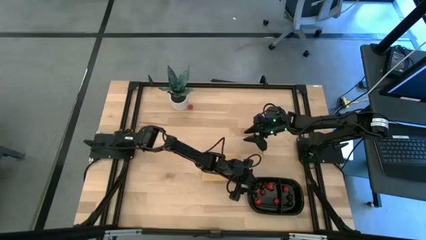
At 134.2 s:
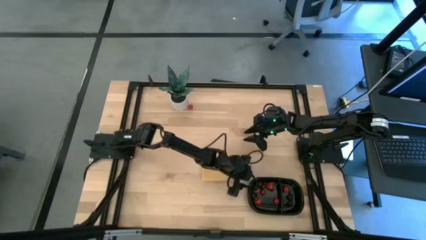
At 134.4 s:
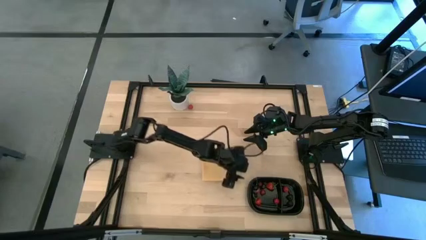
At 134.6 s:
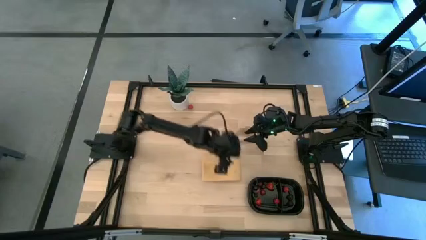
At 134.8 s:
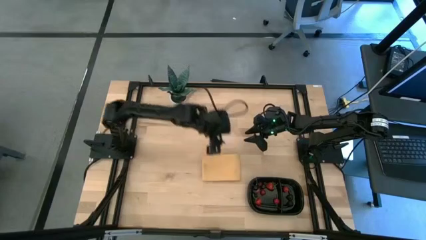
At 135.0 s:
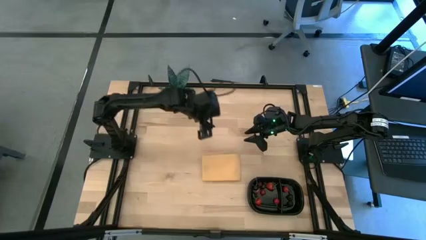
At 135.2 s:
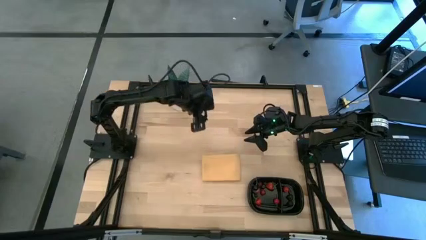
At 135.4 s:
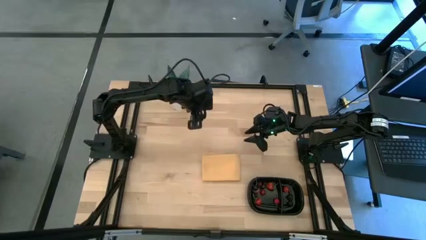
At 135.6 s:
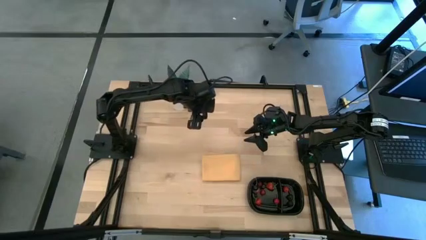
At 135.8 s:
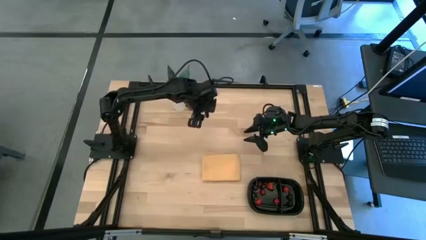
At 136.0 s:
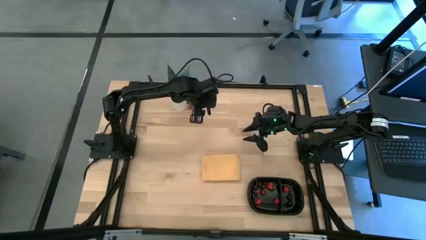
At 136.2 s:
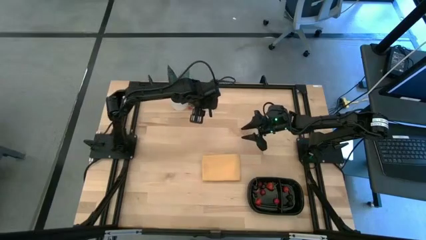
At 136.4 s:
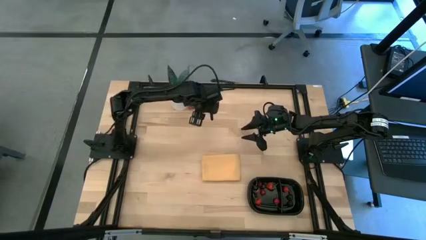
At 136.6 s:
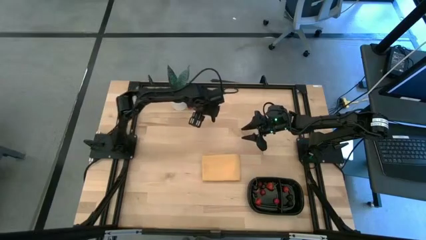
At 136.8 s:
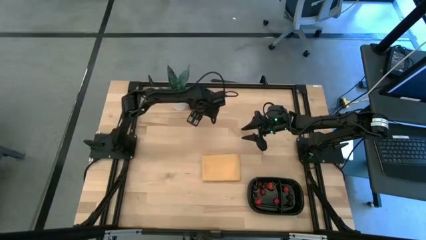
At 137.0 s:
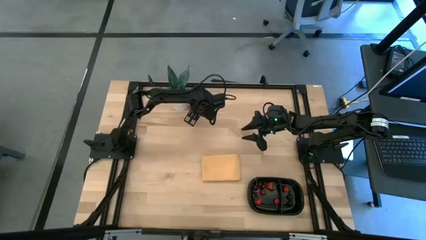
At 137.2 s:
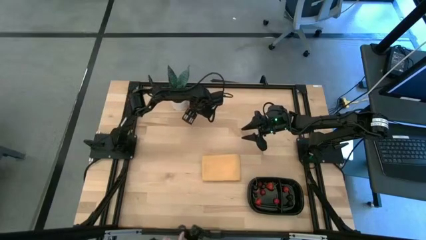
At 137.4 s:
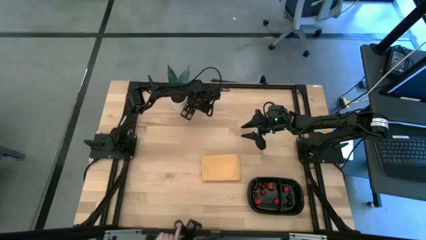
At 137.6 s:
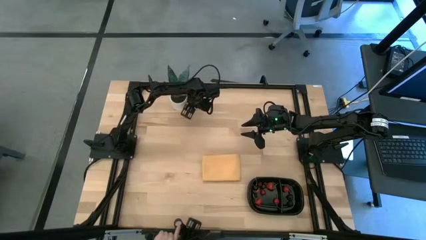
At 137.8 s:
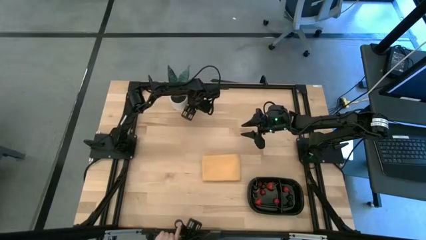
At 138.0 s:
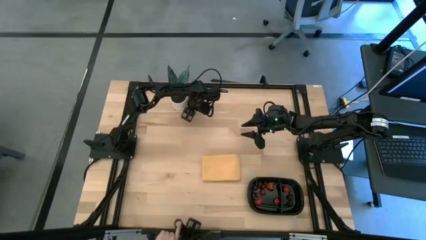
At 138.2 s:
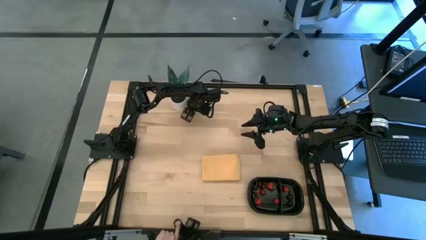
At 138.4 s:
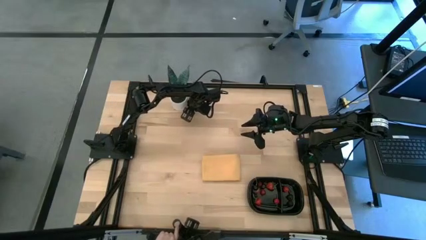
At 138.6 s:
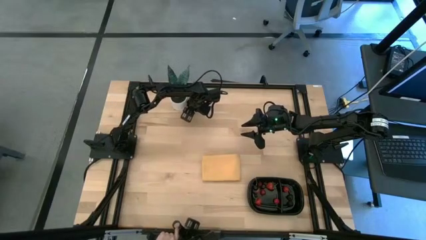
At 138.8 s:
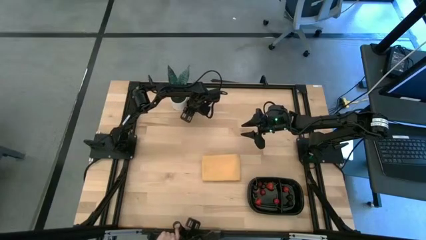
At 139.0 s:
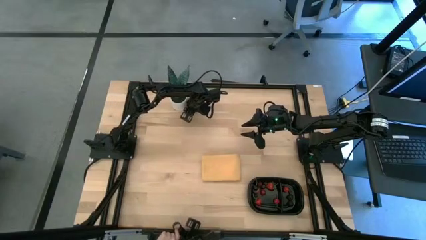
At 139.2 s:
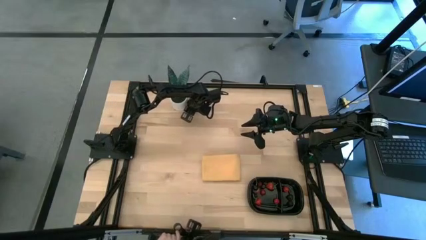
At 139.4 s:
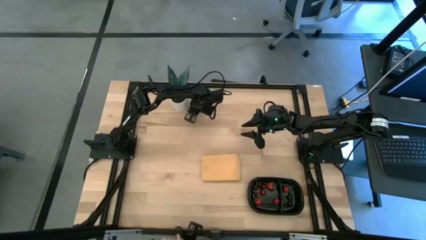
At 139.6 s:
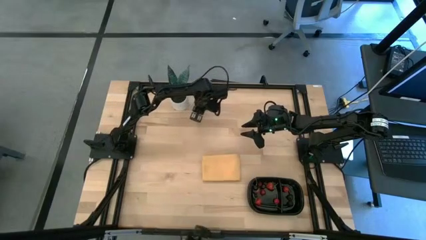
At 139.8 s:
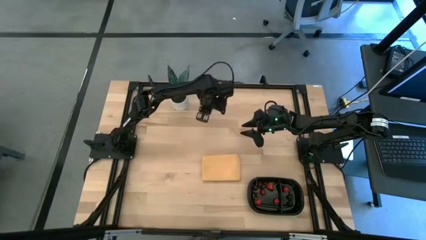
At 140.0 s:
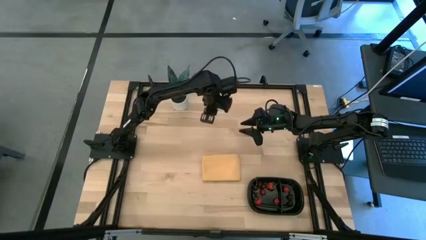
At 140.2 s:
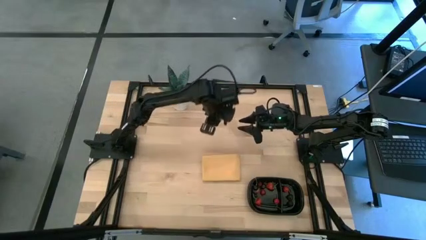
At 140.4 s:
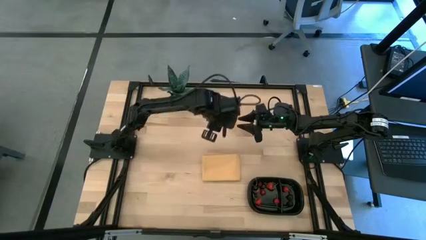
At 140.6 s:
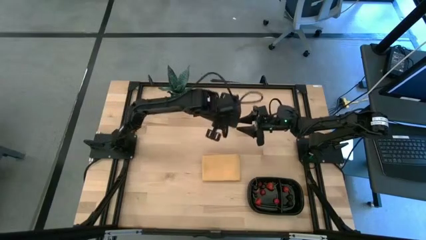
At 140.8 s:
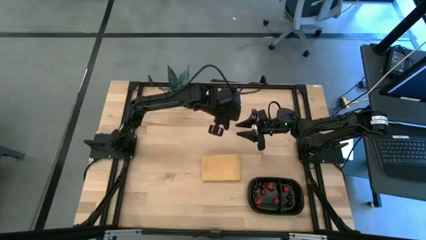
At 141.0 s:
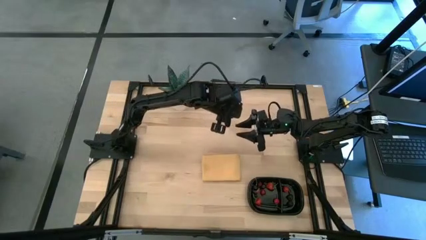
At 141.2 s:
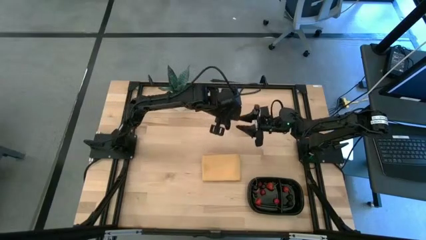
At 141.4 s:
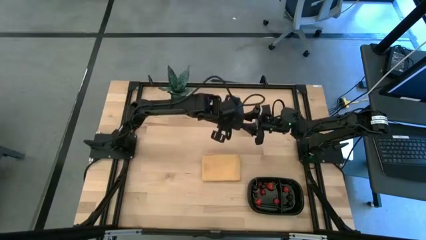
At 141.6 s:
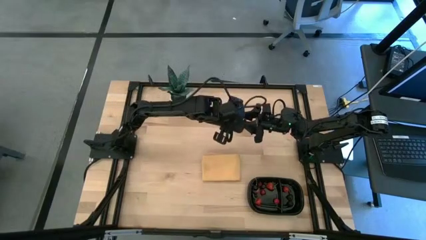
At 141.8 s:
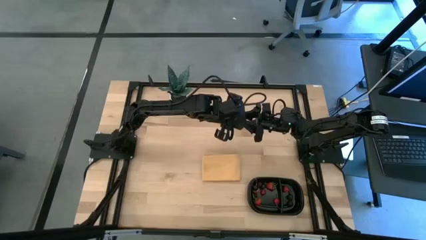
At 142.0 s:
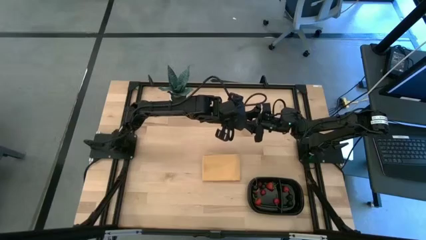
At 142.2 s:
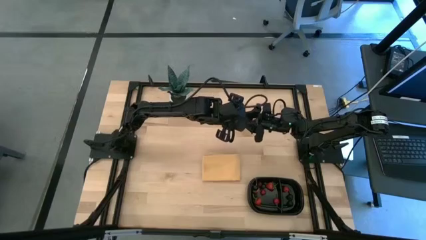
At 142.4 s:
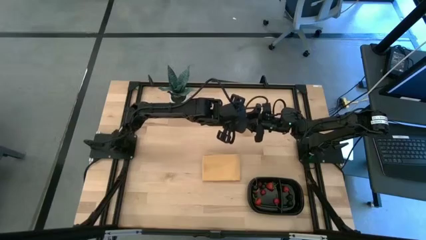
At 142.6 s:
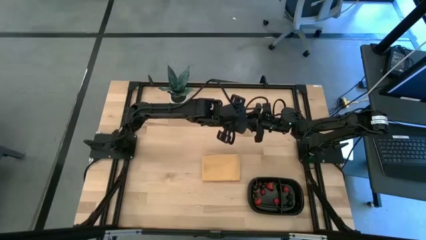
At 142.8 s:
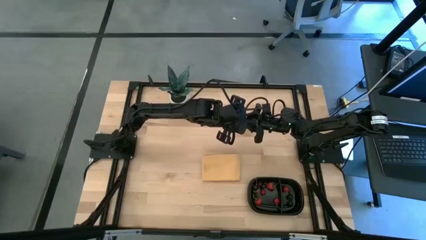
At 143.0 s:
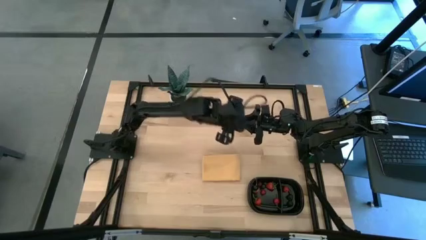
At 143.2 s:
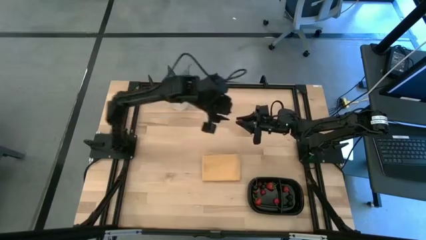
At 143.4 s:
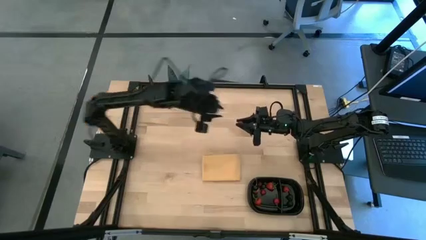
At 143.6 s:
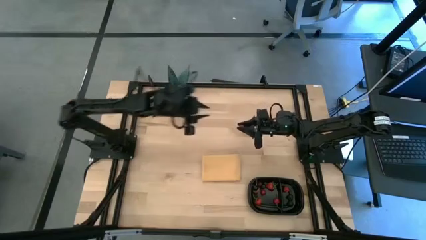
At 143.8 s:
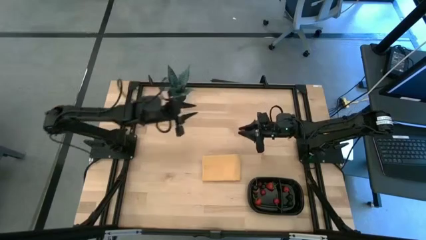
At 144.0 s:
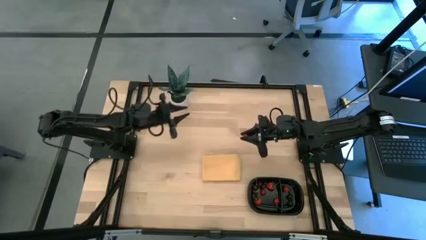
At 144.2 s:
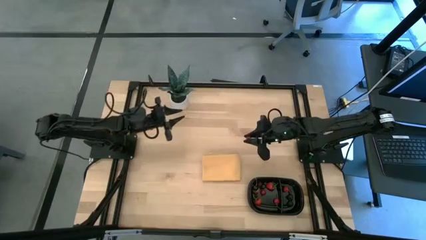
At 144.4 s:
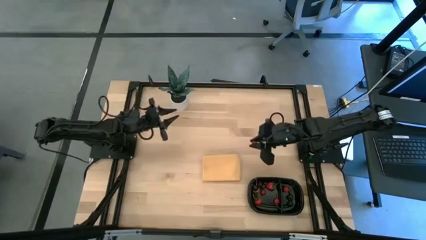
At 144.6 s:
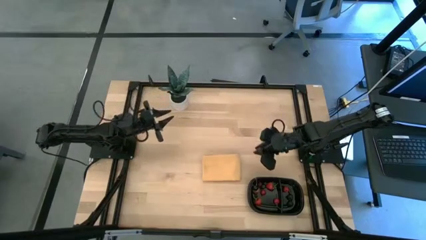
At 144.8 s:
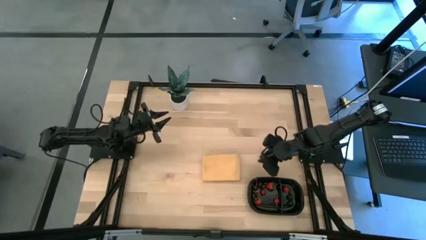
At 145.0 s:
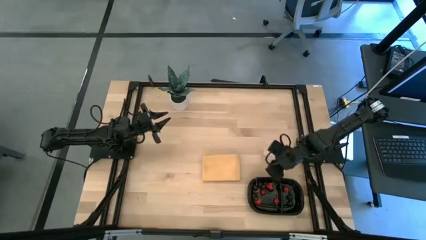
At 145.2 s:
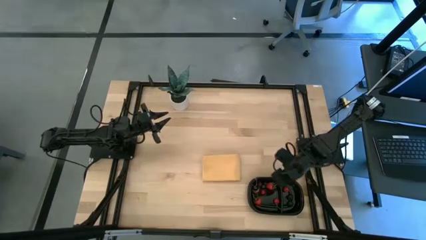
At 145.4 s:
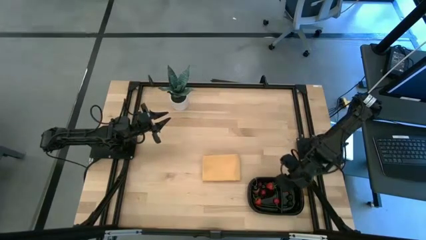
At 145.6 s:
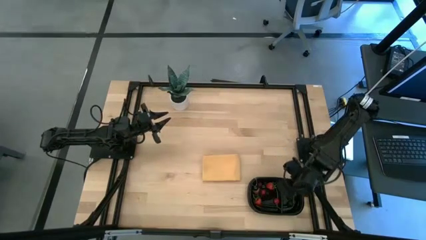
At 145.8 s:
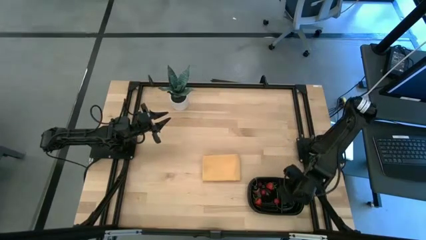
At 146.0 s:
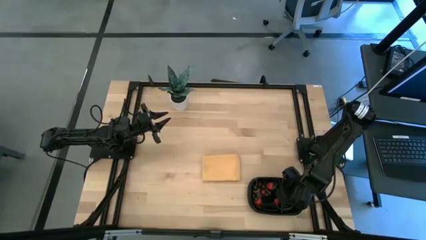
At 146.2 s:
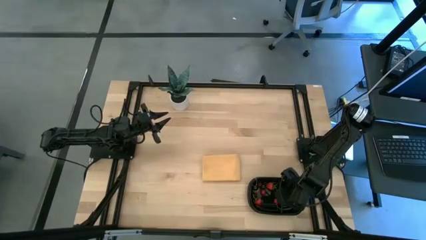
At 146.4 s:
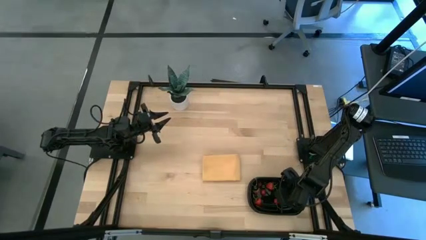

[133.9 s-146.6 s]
Task: Pick and placing Produce into tupperware
Put the red raspberry into the black container
